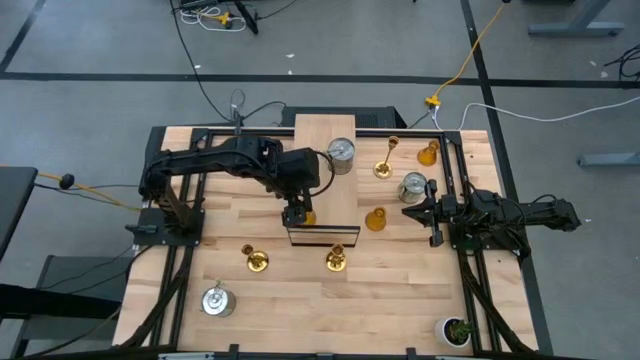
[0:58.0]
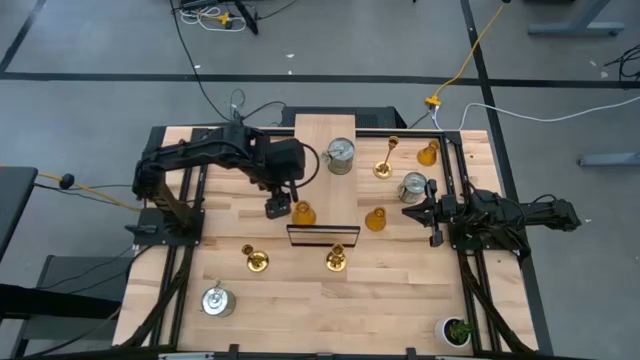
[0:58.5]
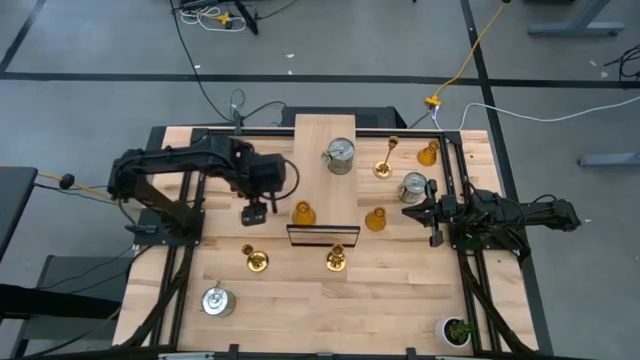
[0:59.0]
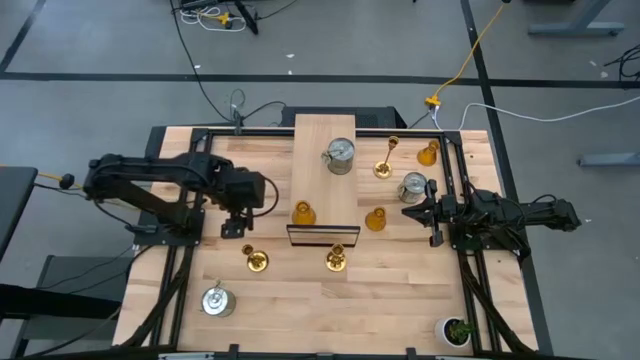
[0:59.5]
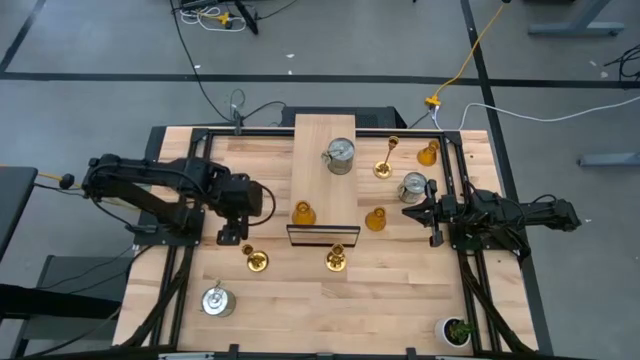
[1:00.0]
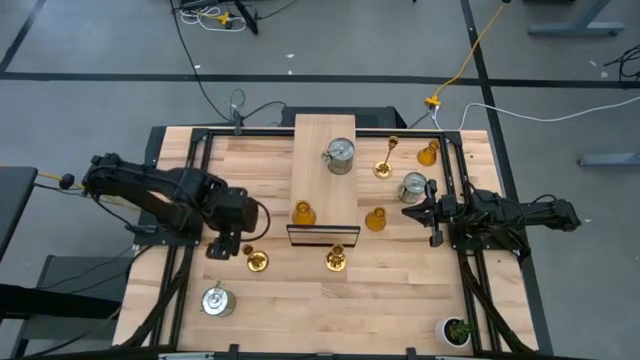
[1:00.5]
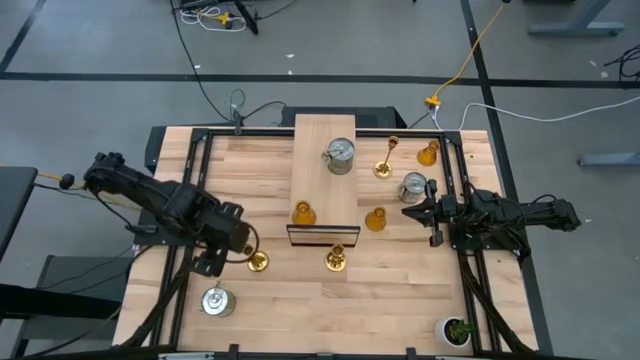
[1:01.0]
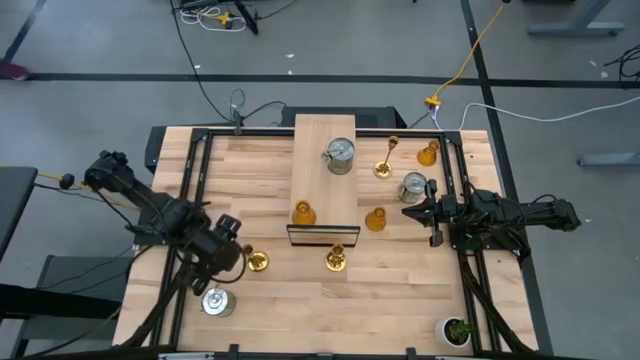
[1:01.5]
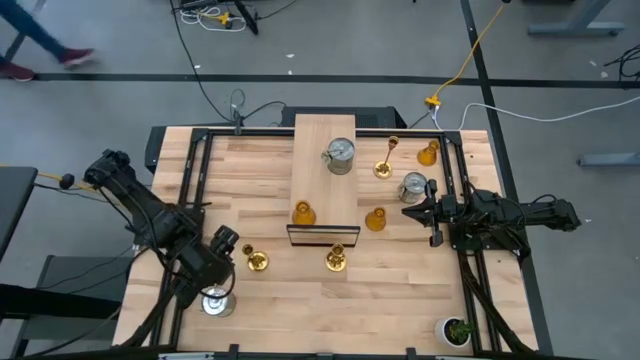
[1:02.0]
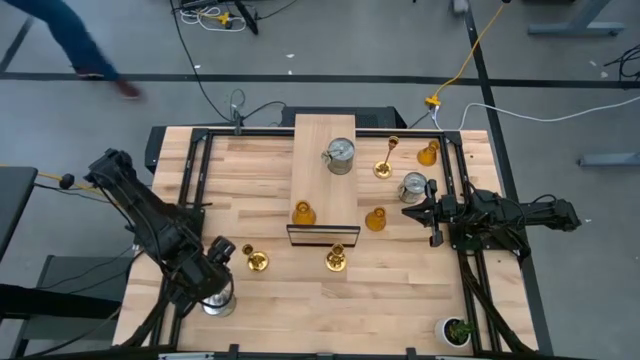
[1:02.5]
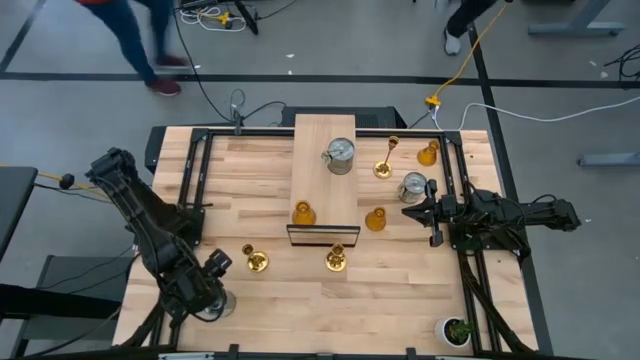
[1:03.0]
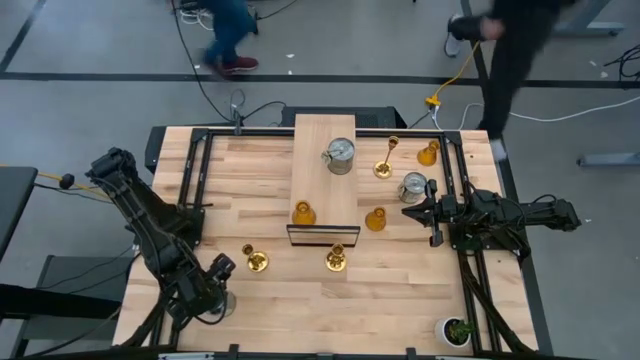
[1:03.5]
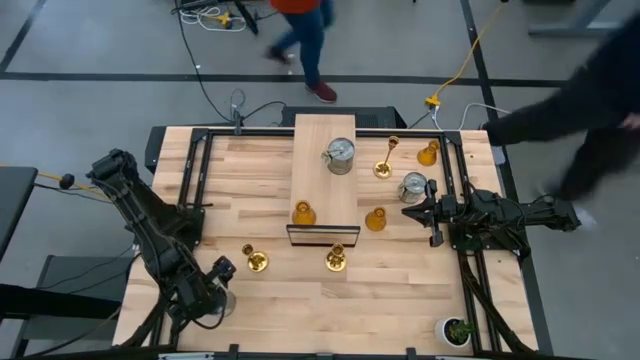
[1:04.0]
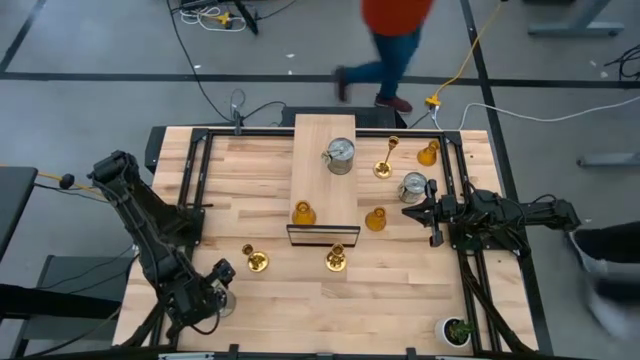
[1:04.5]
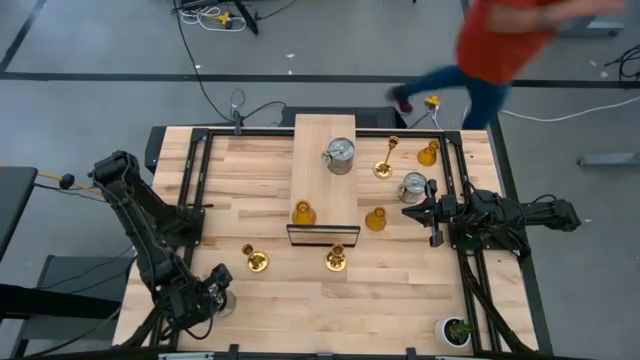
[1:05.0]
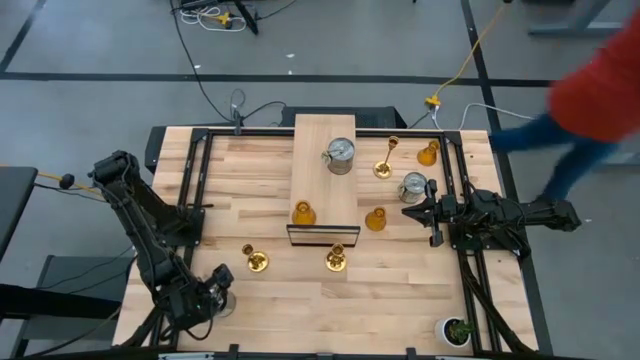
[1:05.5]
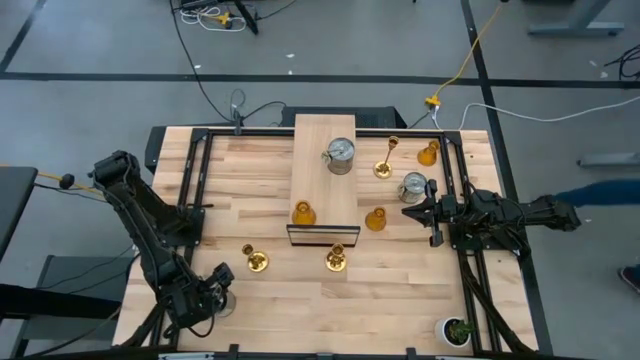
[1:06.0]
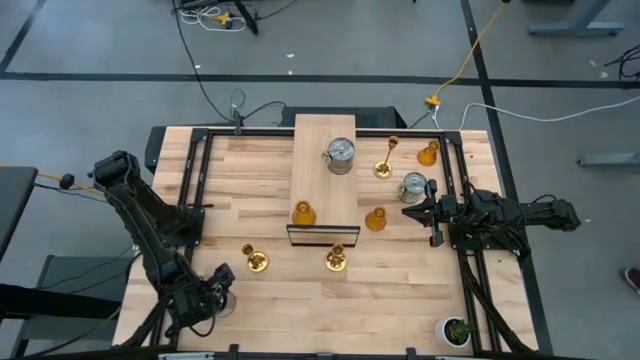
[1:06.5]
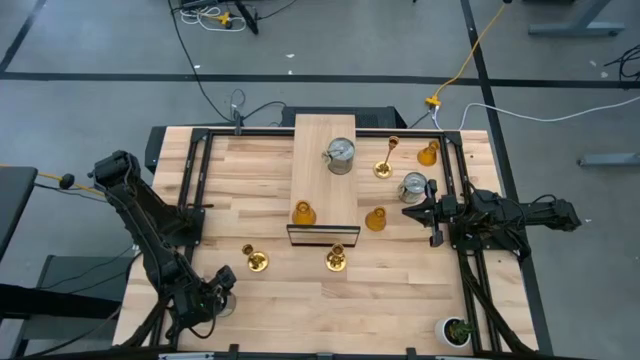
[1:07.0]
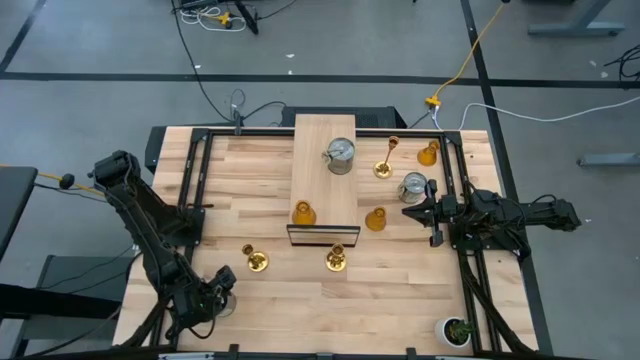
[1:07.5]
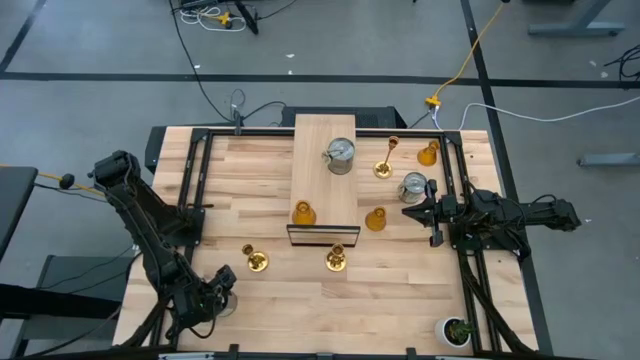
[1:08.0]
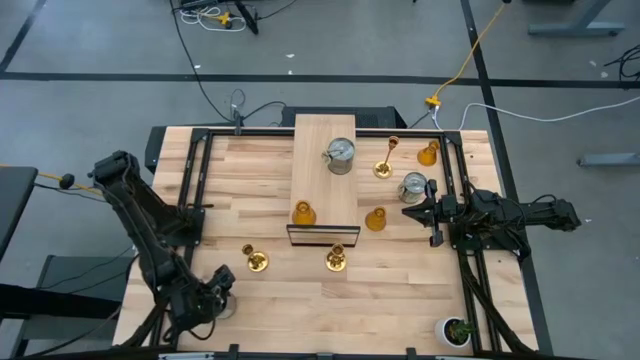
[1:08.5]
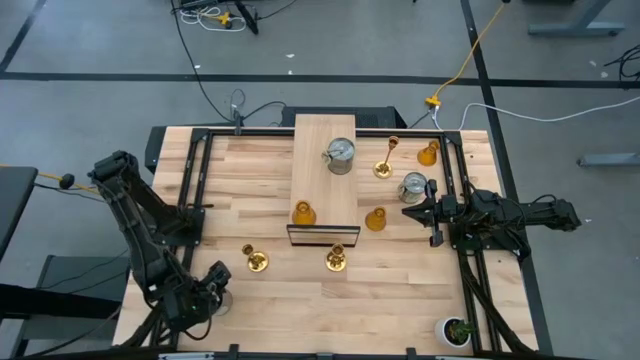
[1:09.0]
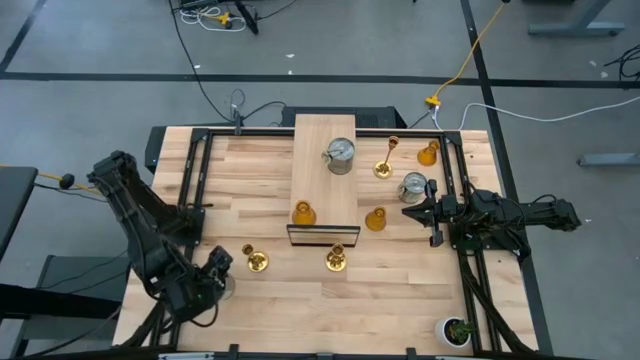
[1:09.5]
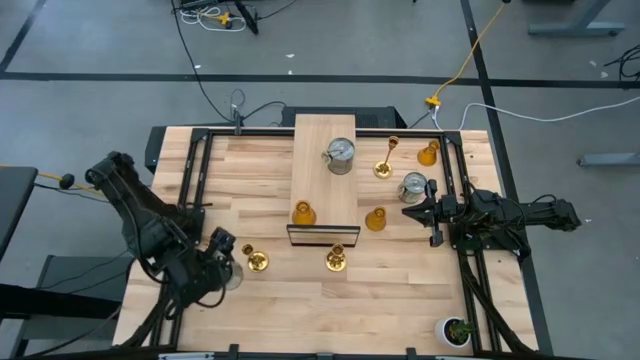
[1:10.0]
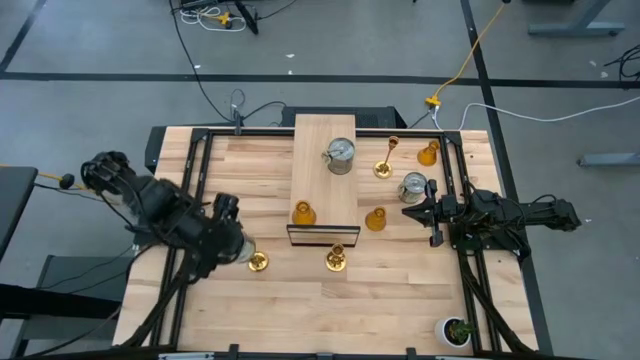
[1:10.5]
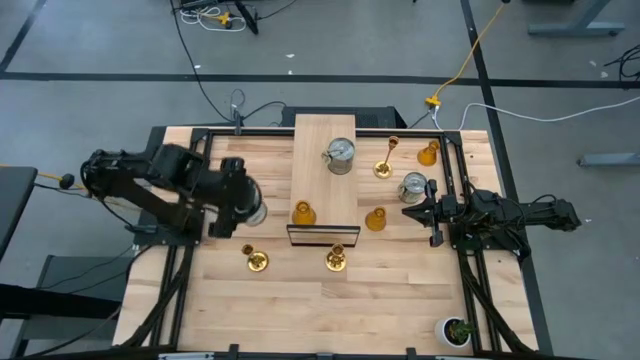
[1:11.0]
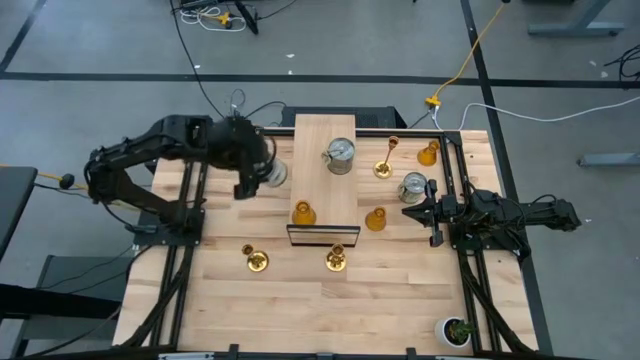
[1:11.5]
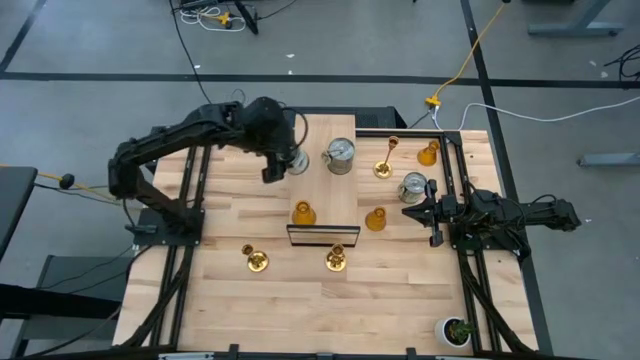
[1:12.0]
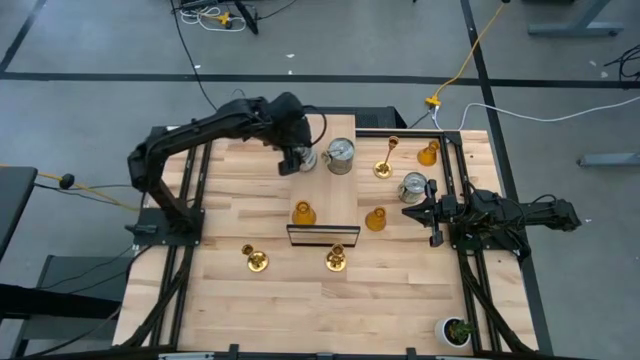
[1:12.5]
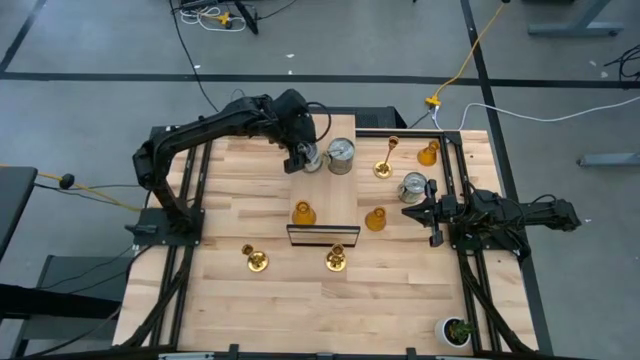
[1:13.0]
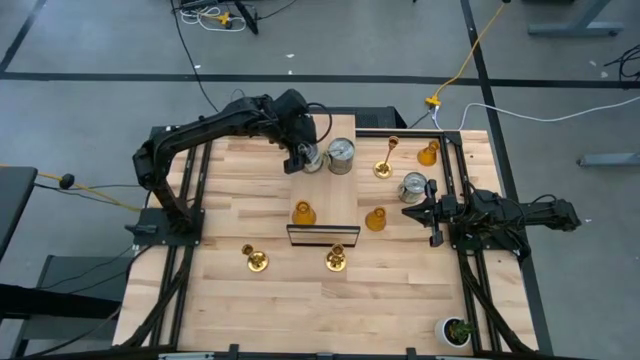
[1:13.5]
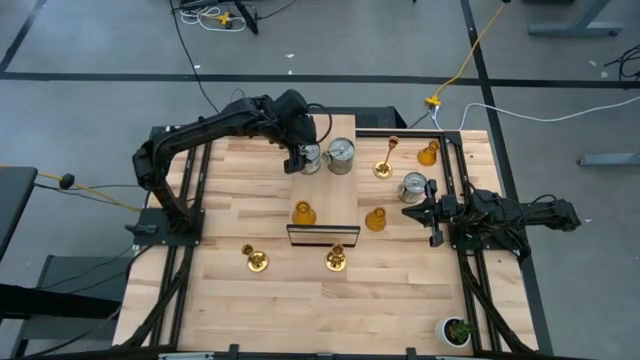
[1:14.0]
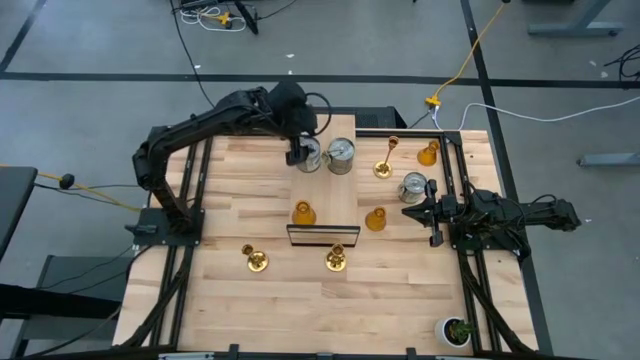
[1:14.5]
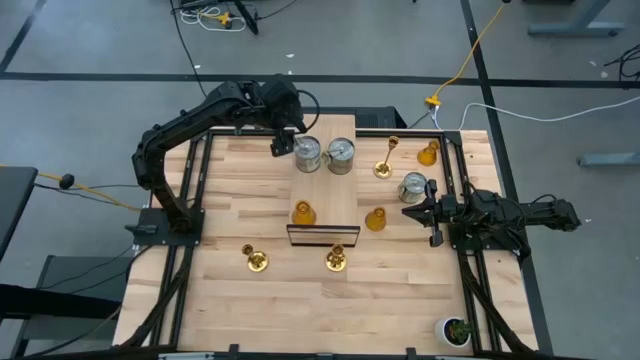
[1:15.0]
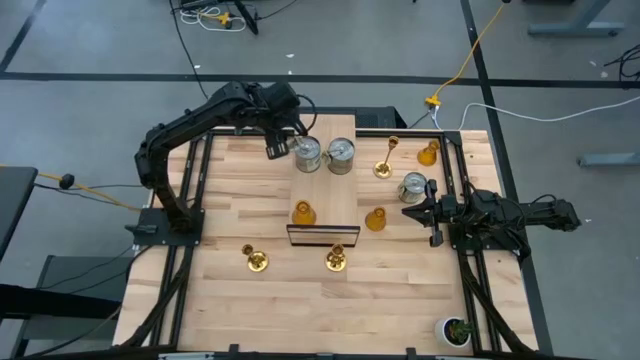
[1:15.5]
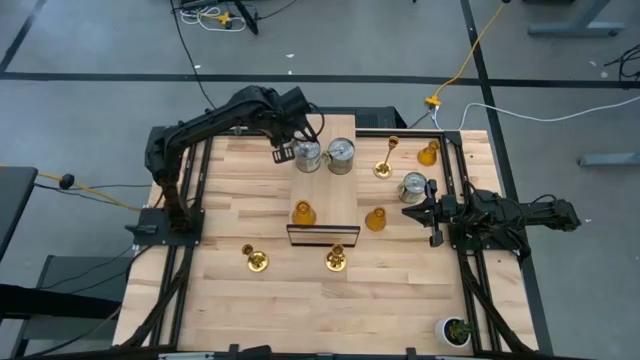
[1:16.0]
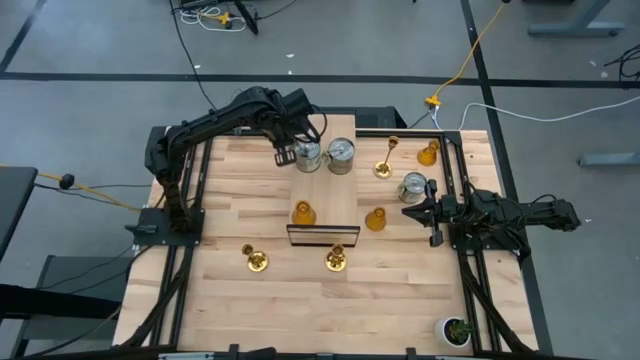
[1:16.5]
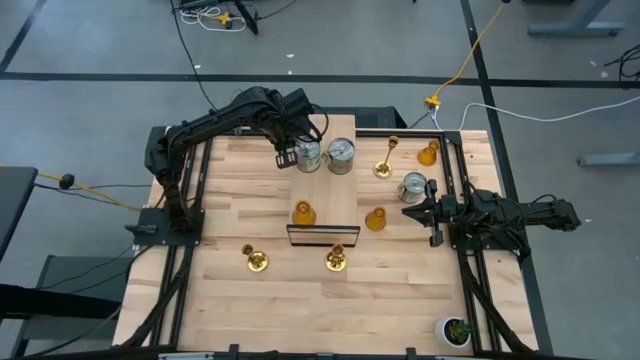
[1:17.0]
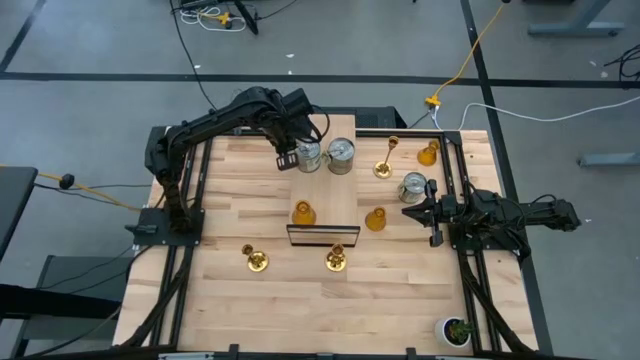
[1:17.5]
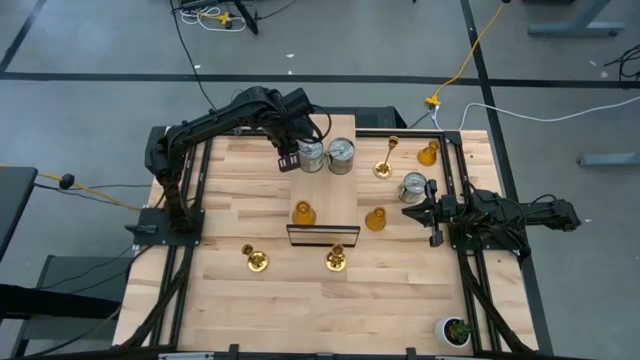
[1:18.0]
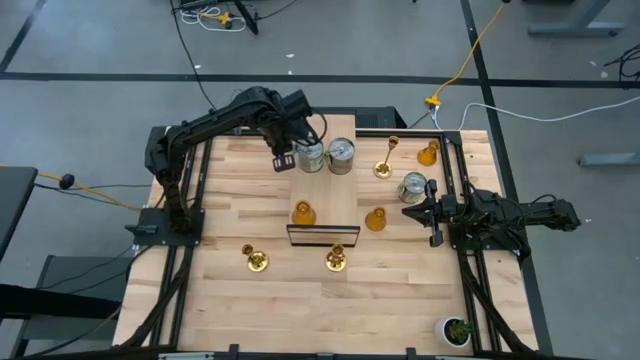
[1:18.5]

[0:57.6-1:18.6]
Task: Pick & Place candle stick holders
Put the bottom scented candle can aligned with the other scented candle can on the shelf

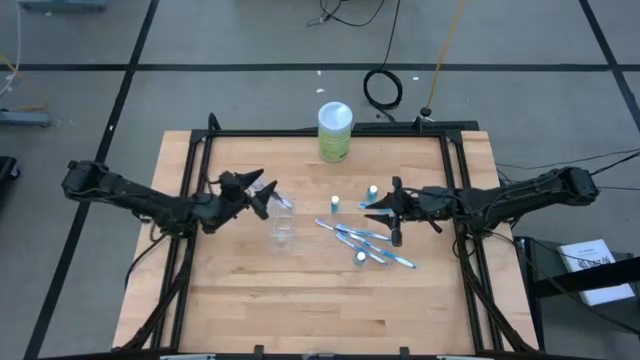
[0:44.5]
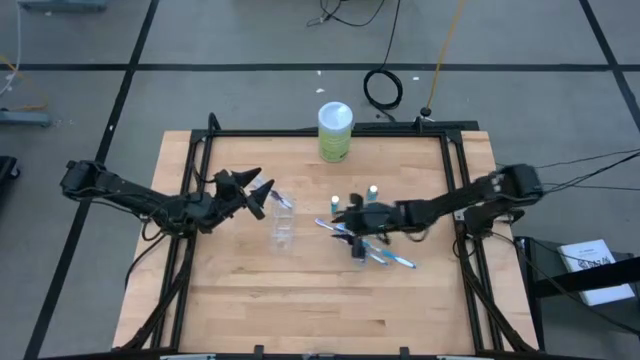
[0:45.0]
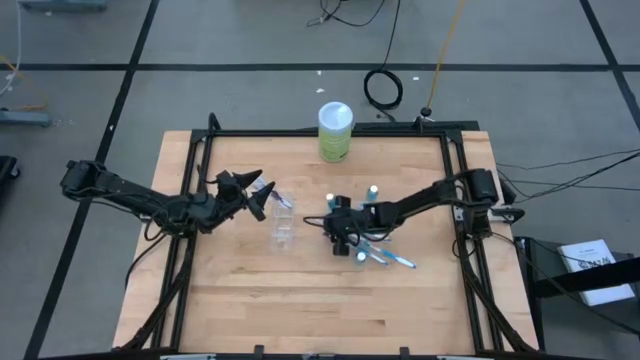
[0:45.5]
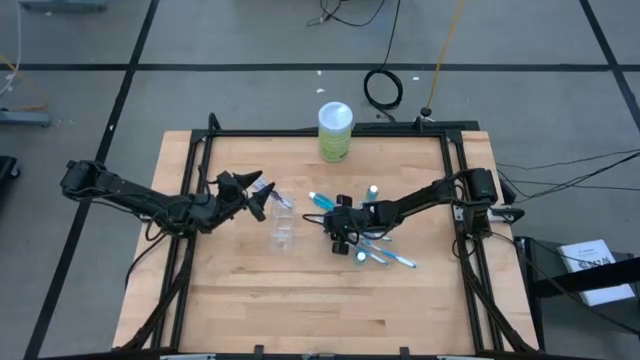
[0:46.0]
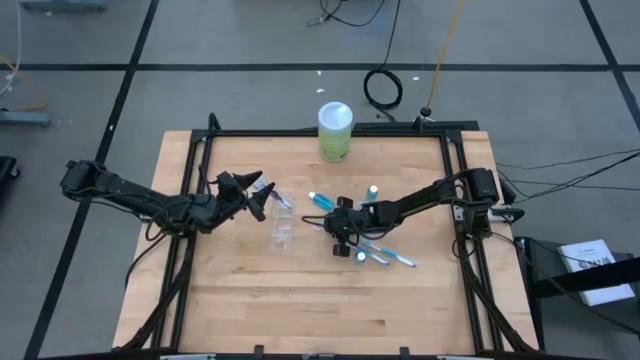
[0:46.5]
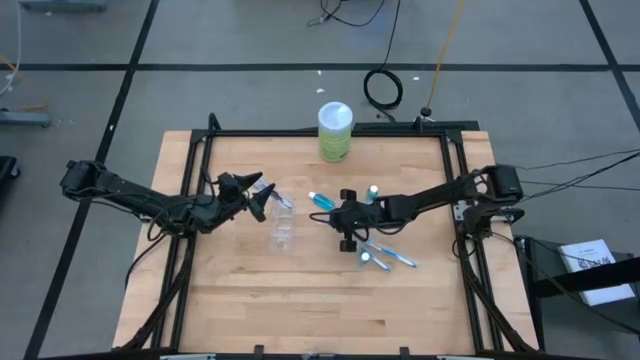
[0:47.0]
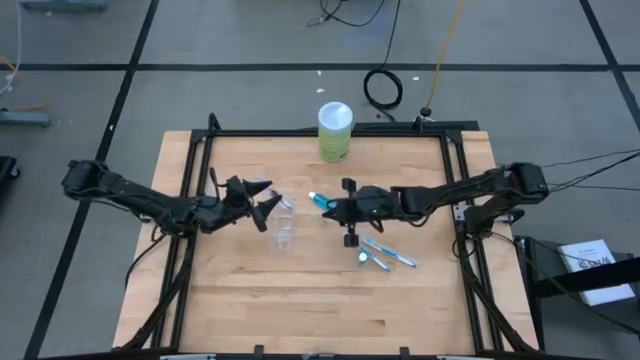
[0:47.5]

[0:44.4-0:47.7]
Task: Pick & Place toothbrushing station
Put the purple toothbrush into the transparent organizer
